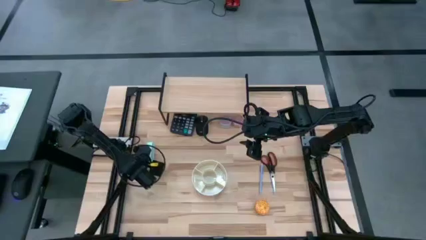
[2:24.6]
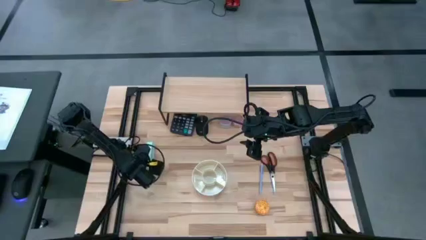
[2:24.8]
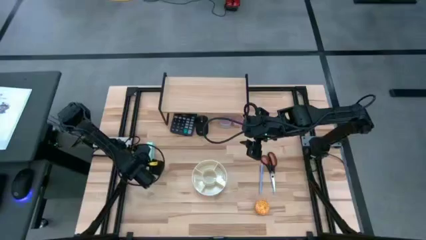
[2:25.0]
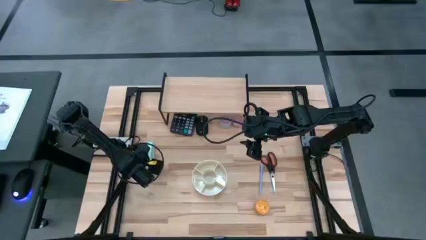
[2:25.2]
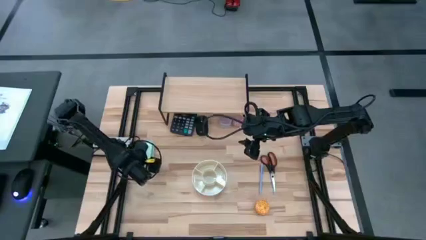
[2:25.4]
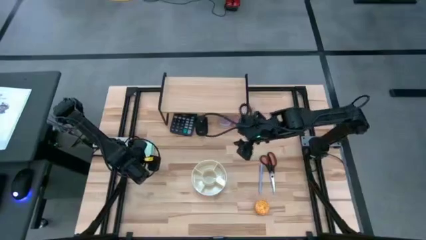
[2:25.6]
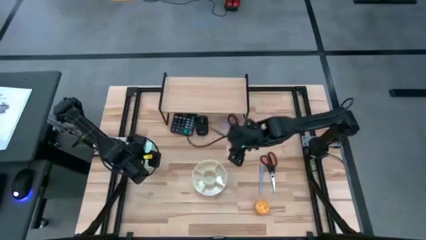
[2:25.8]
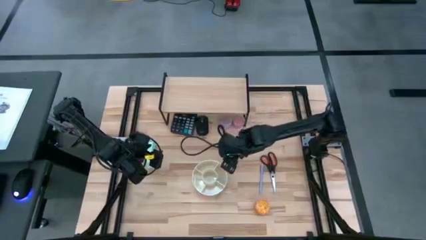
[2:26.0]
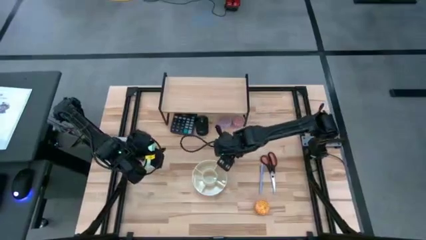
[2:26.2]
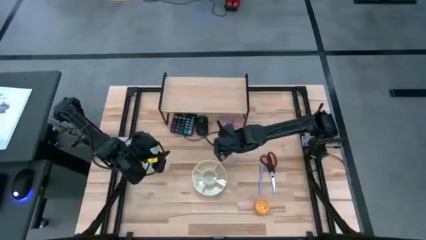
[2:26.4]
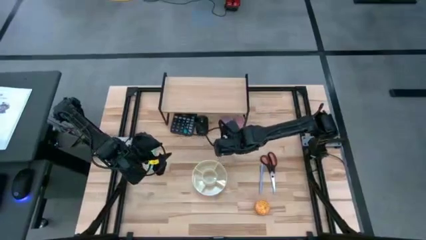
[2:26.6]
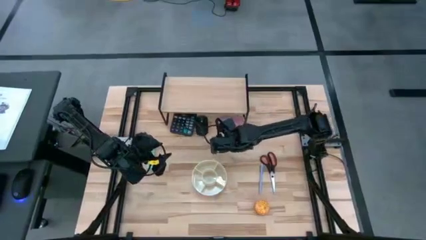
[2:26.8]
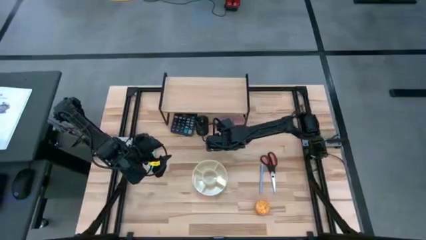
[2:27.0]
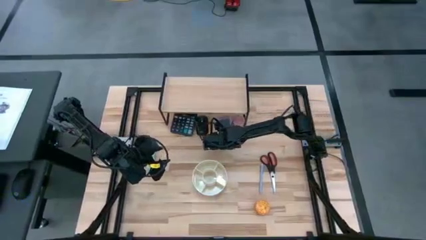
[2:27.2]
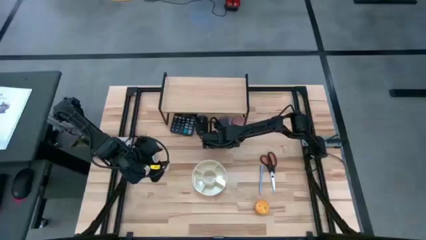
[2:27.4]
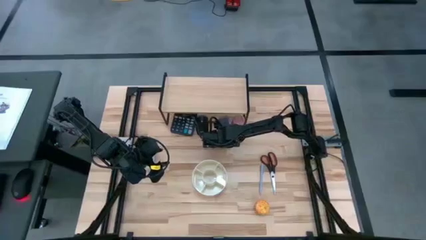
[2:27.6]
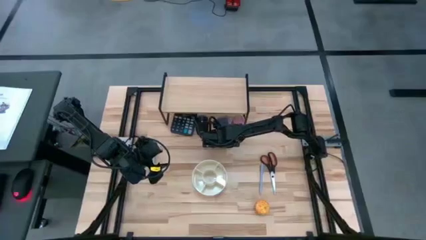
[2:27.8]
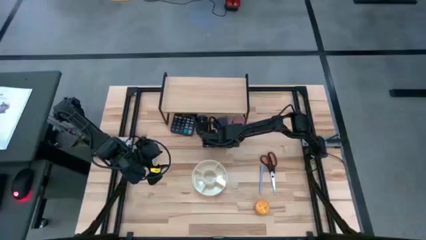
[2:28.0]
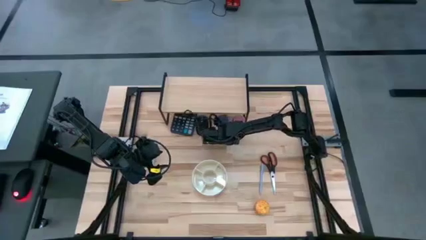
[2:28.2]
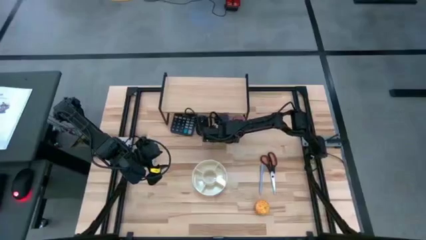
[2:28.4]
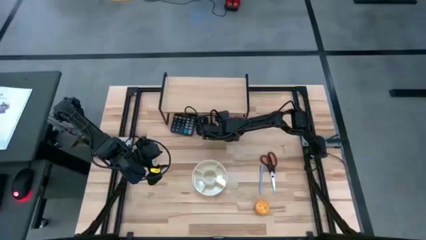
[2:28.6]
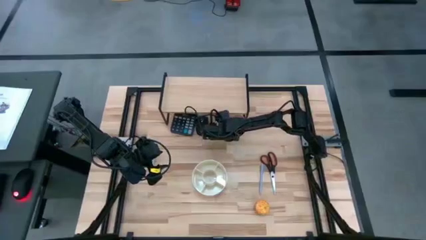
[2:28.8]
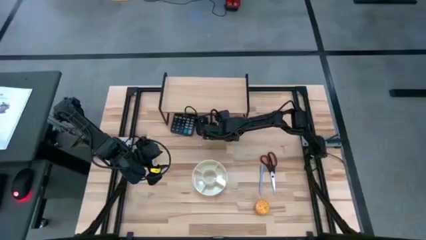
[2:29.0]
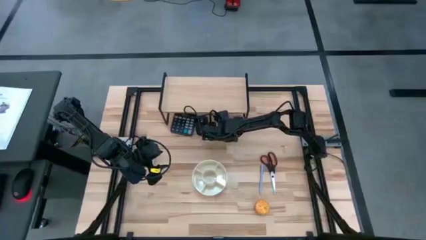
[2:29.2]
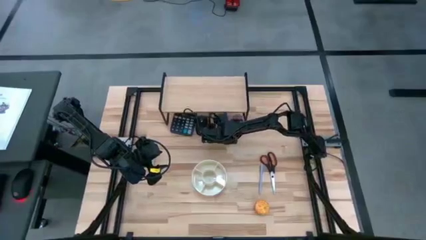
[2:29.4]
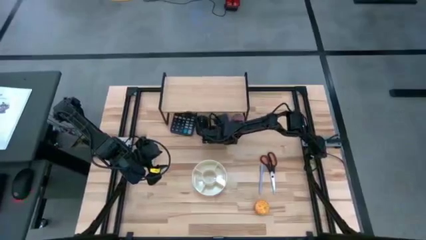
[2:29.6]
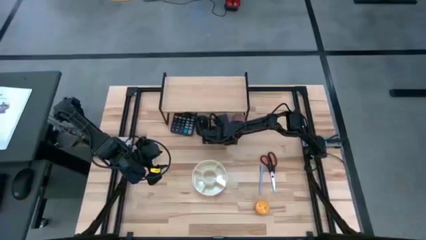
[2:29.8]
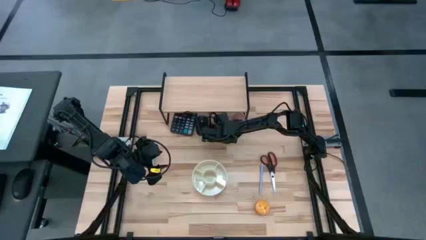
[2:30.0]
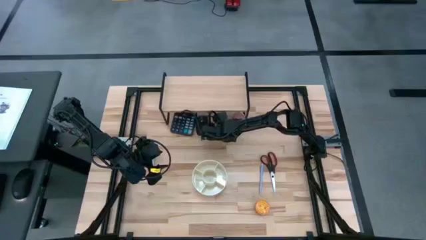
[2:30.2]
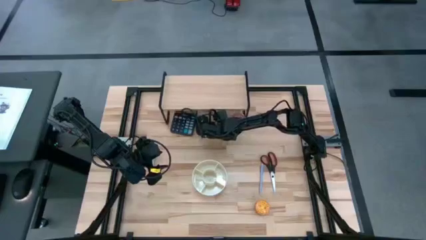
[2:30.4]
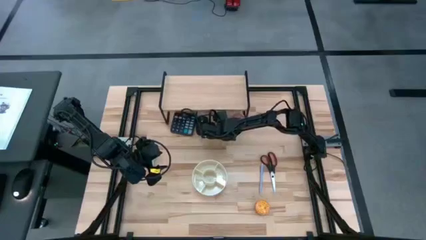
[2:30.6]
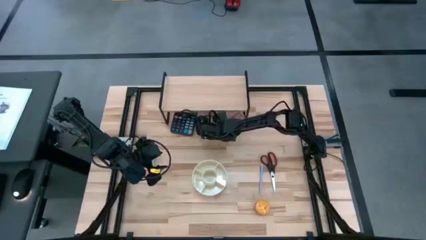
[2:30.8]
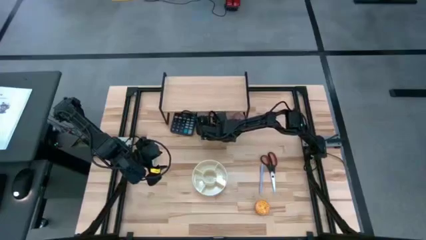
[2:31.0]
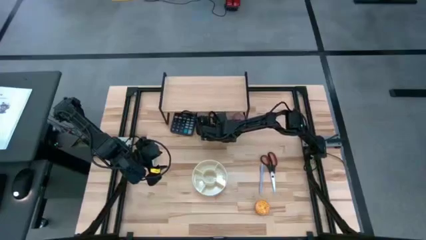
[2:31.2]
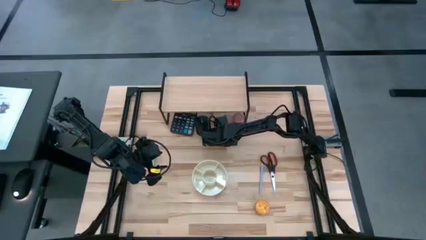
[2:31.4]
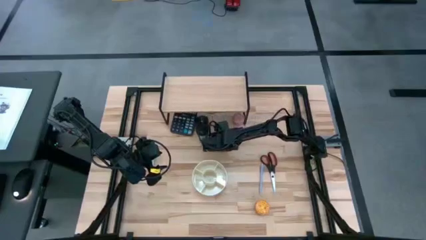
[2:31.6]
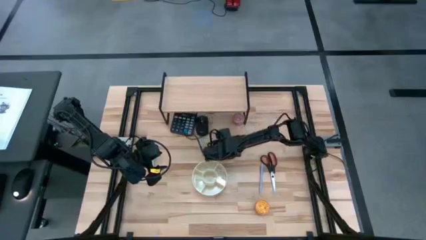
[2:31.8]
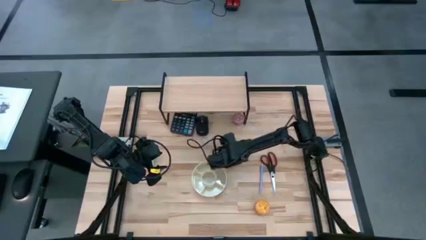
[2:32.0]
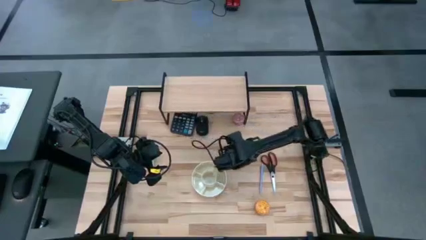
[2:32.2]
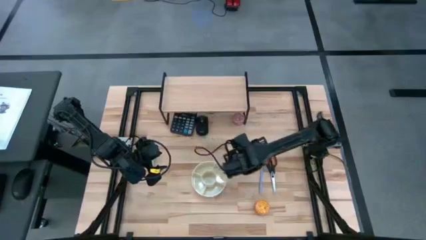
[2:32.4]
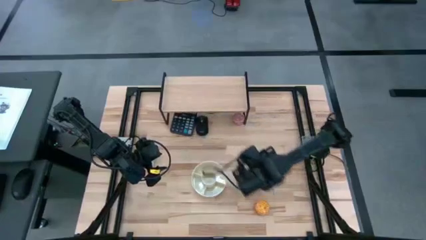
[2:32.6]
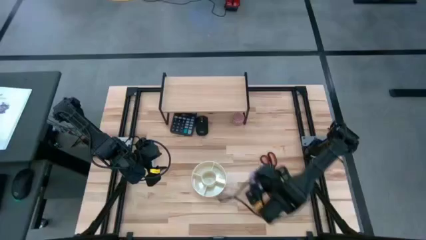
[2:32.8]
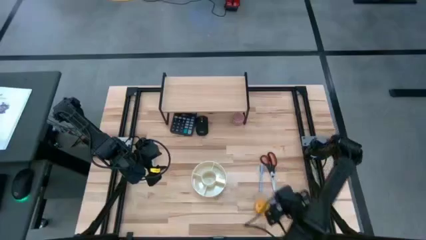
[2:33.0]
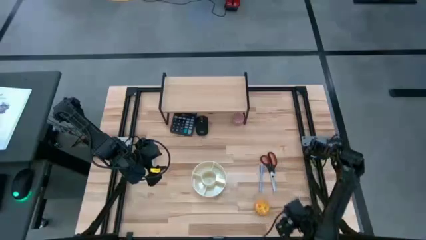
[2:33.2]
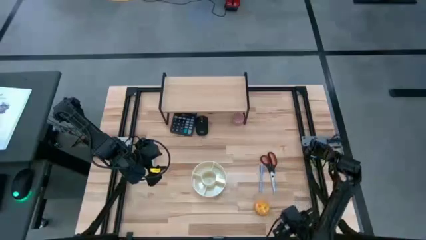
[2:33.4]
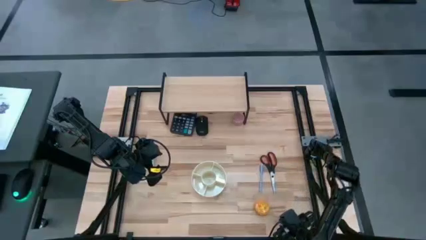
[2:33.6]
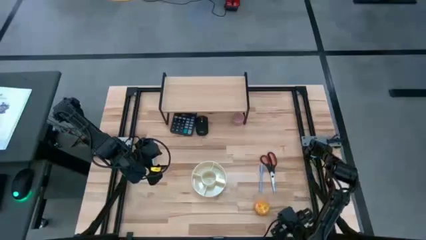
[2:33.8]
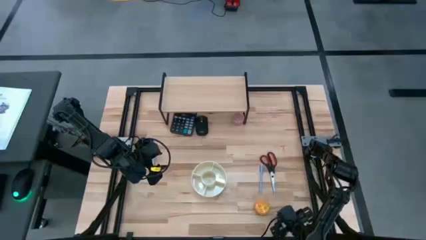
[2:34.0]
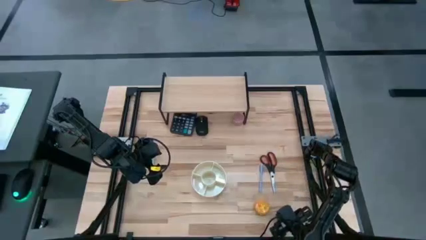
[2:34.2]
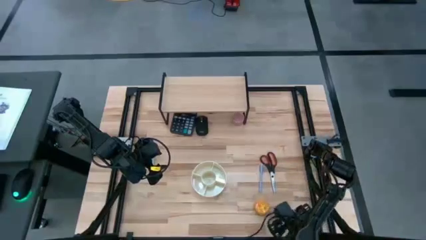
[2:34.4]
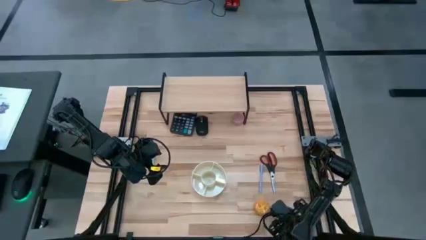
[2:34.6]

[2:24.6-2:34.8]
Task: Stock shelves
Remove the pink scented candle from under the shelf
